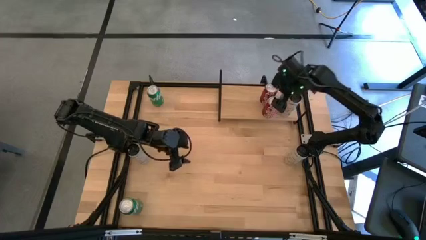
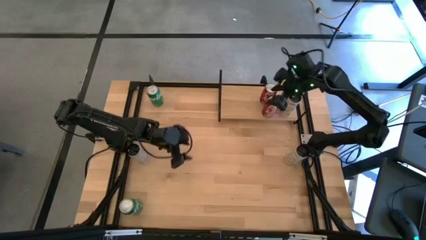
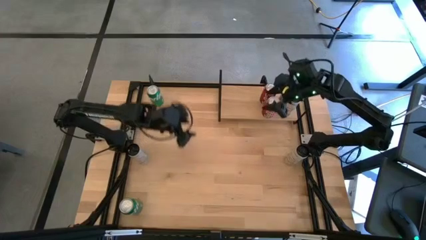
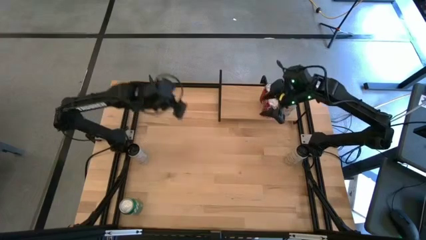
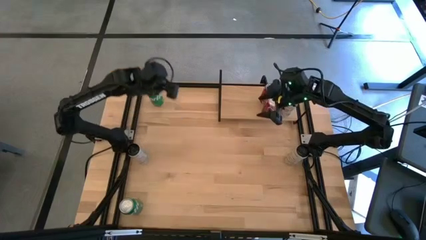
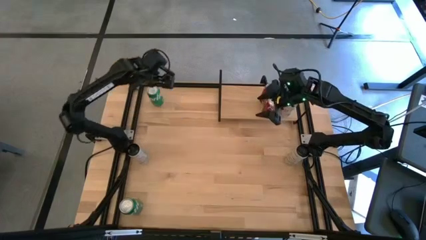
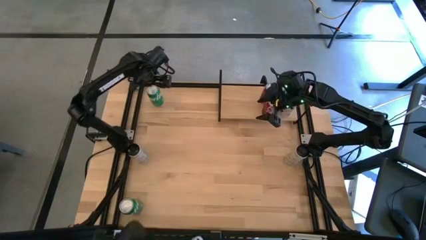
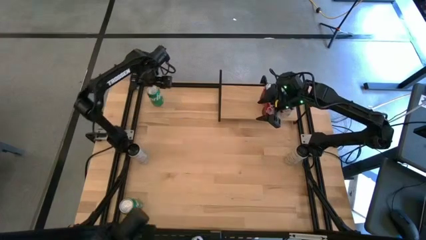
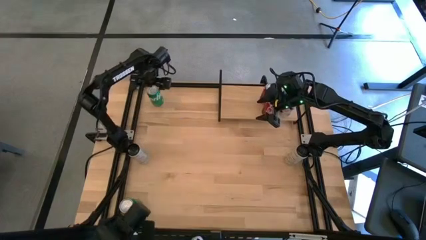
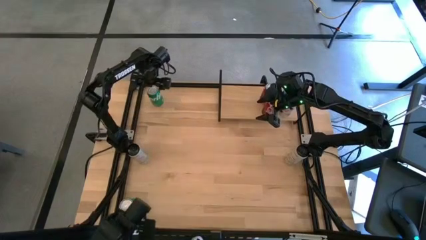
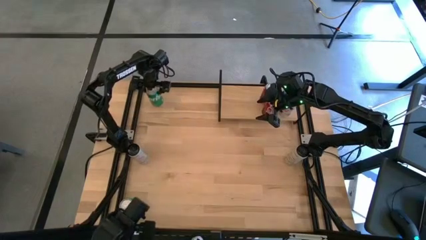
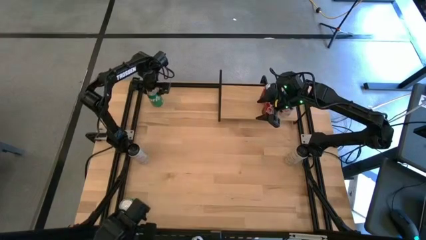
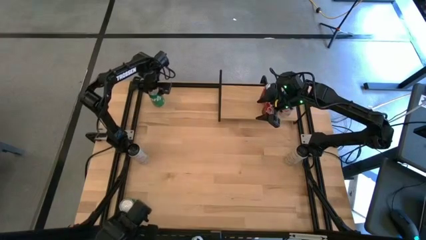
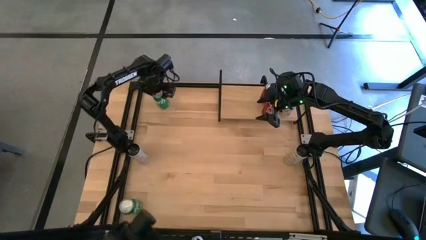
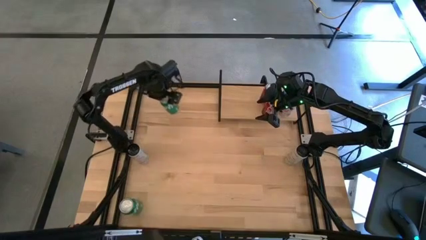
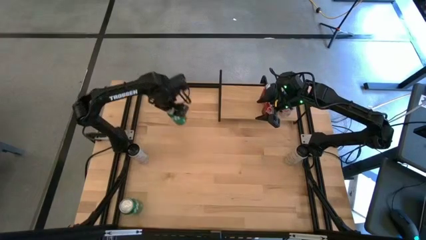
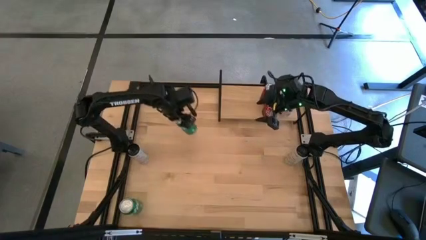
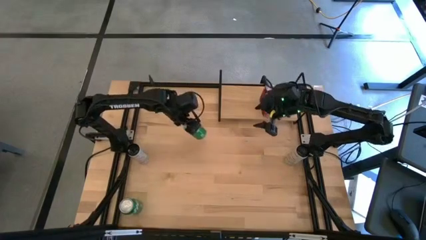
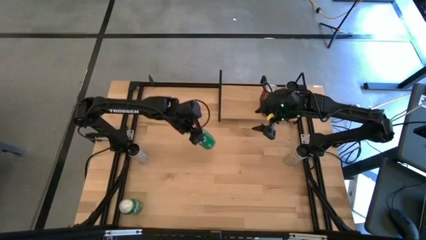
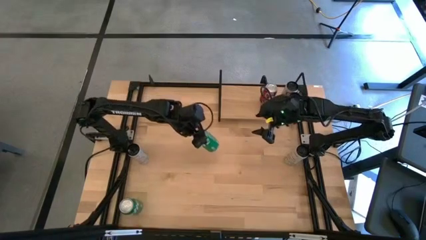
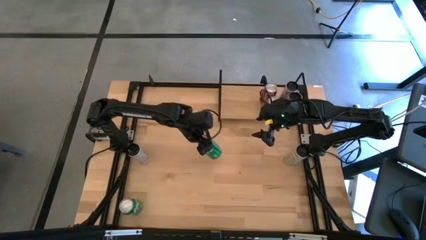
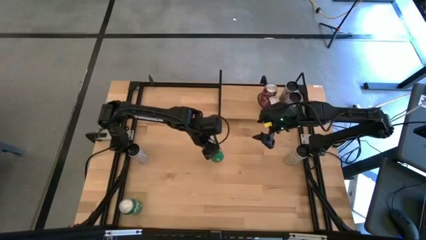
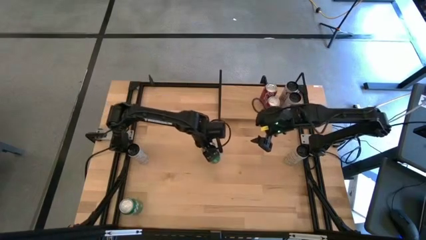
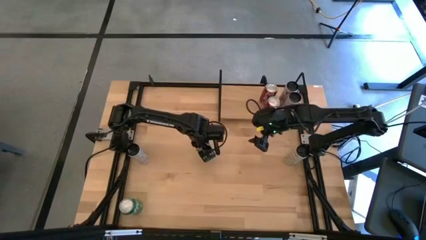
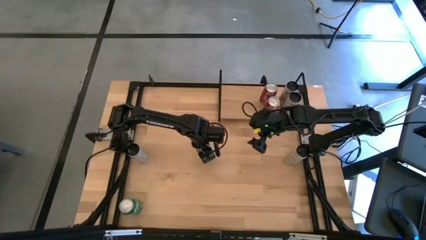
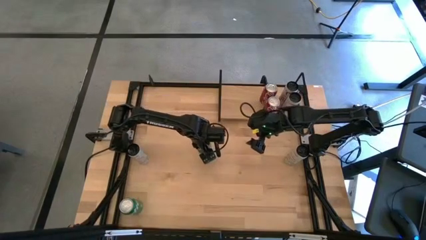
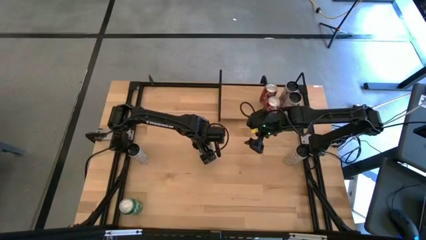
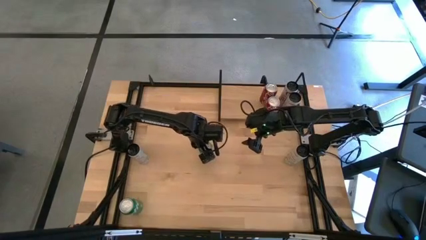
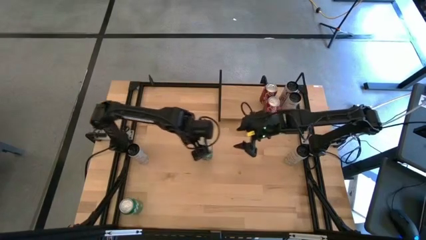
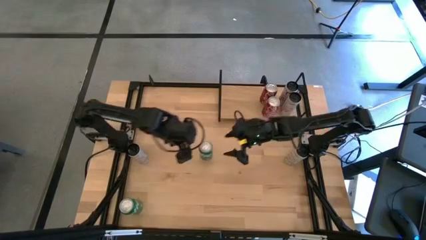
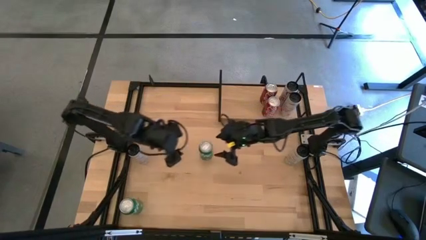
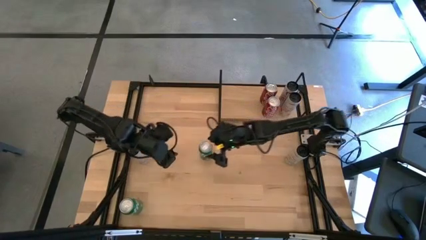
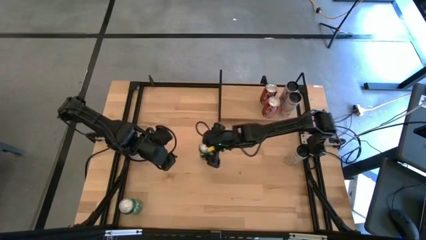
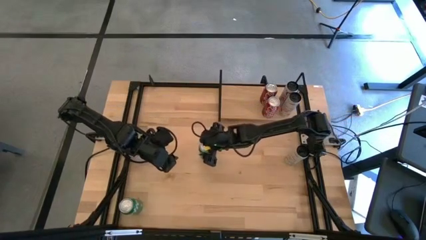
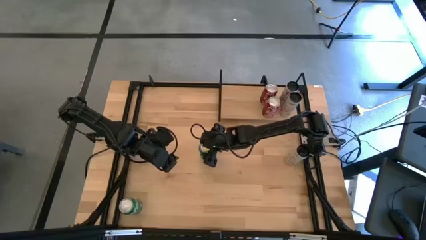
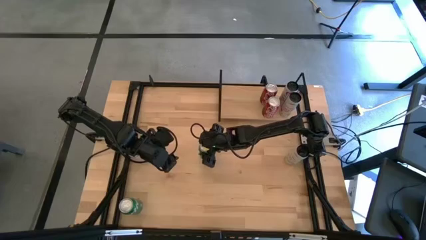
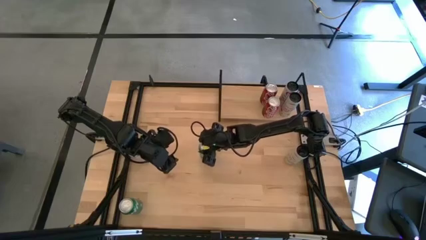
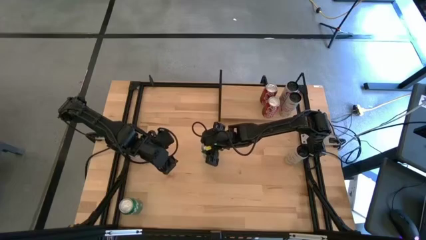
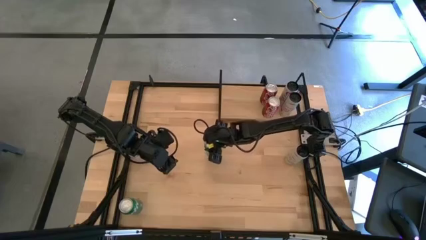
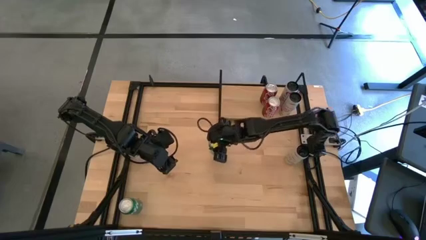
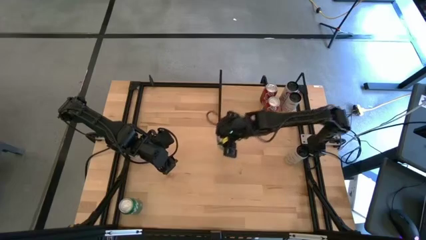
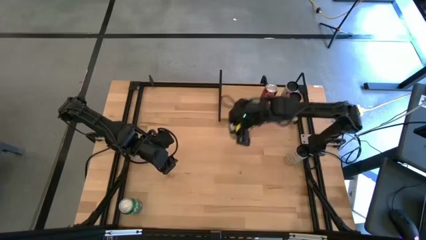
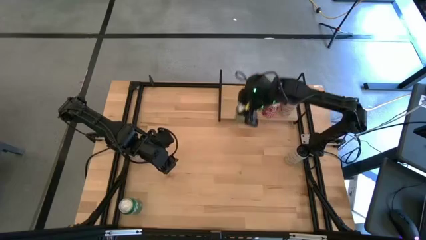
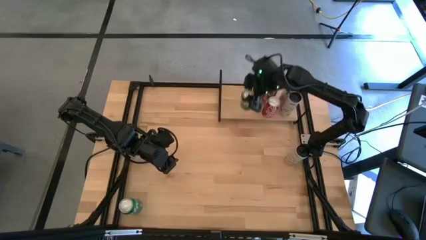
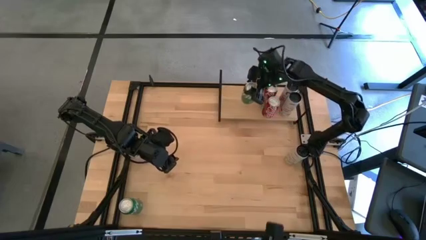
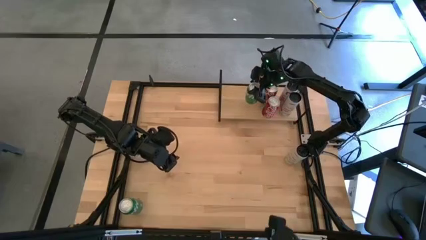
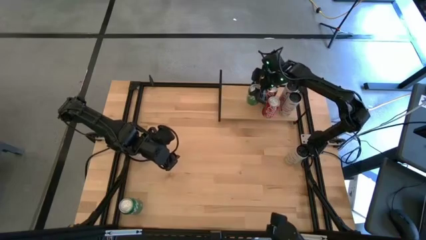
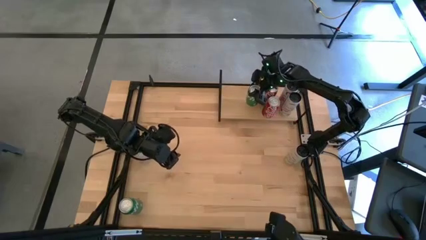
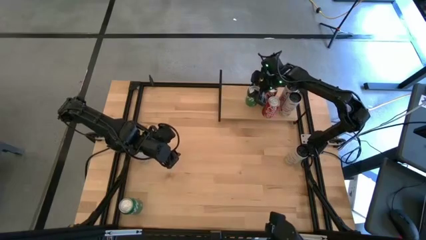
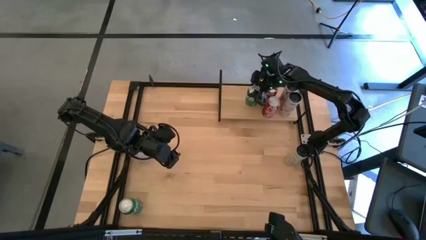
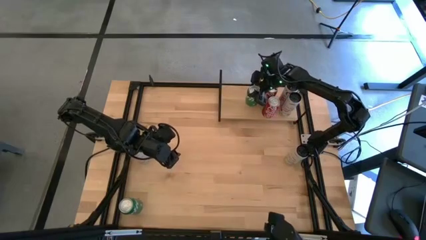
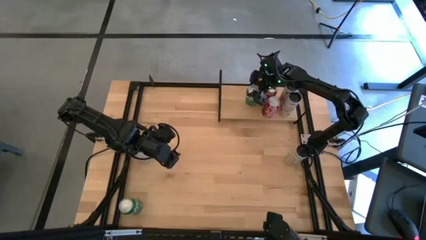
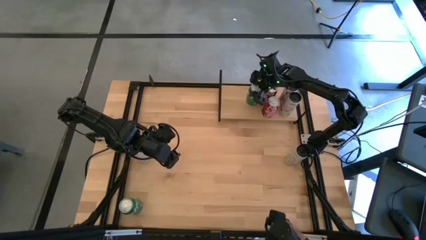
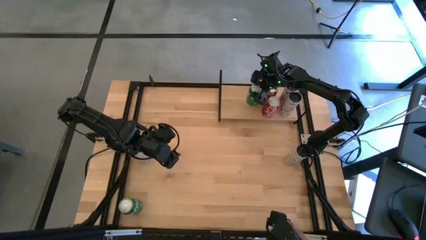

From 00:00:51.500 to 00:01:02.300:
Task: Place canned beverage on shelf
Put the top green soda can on the shelf

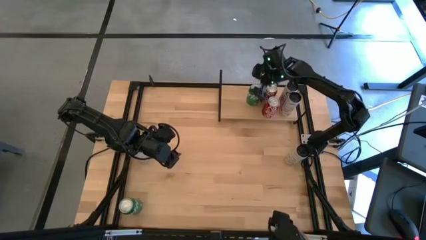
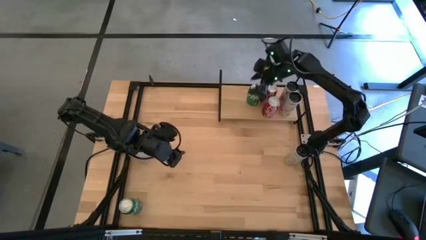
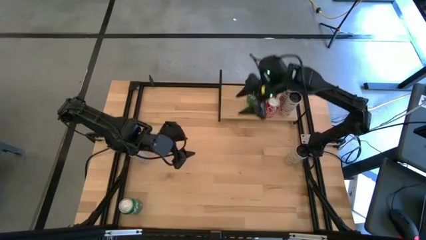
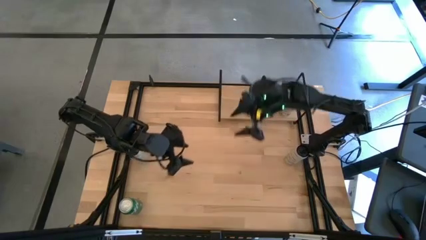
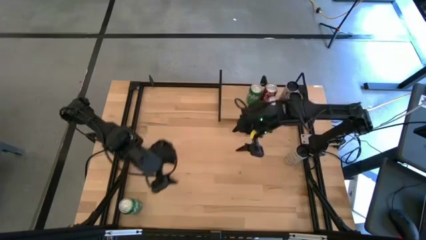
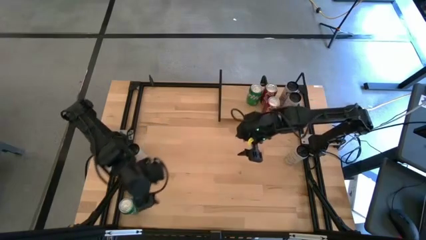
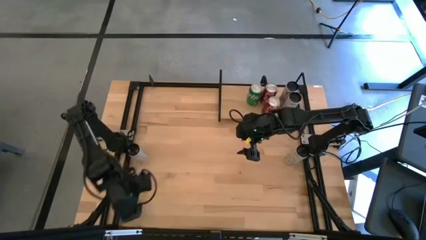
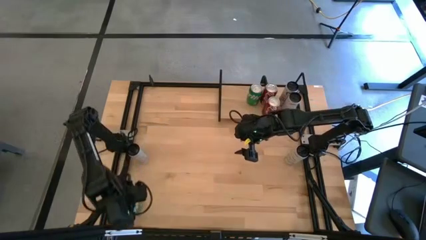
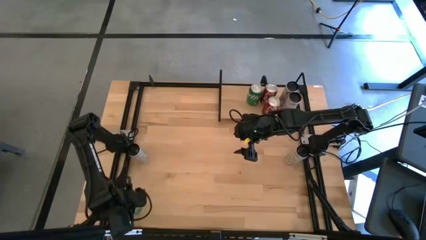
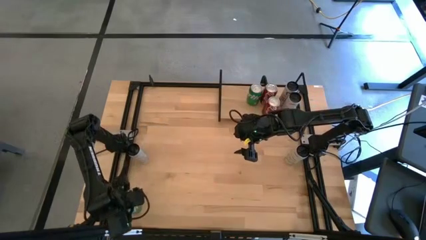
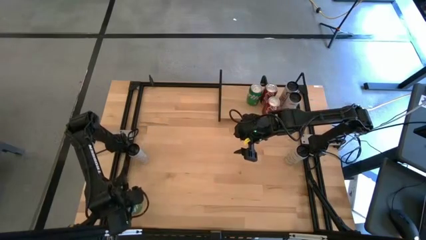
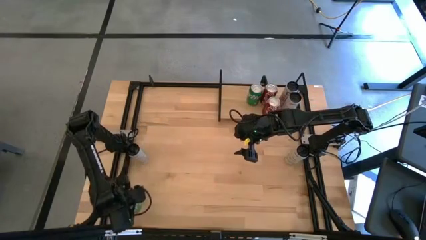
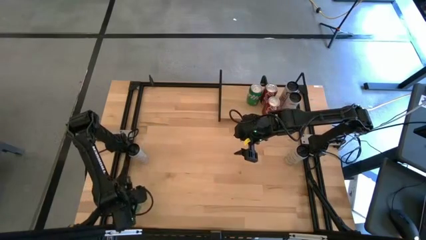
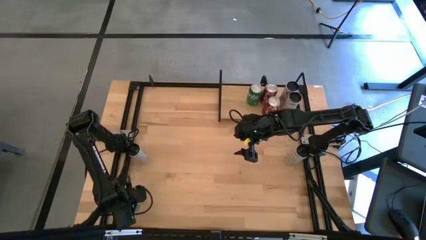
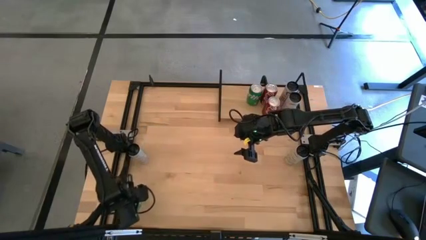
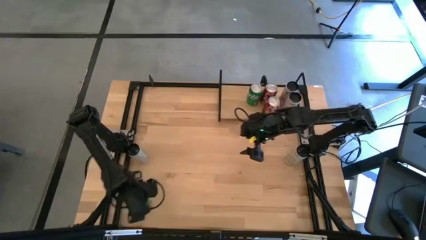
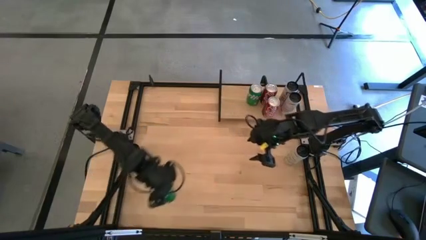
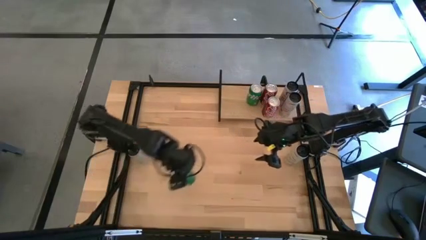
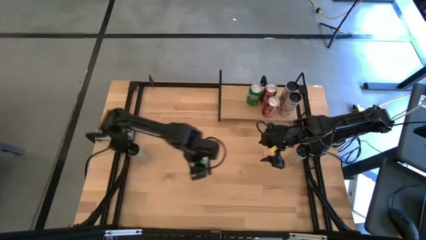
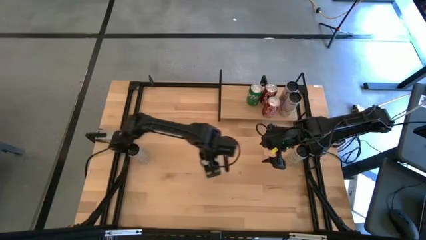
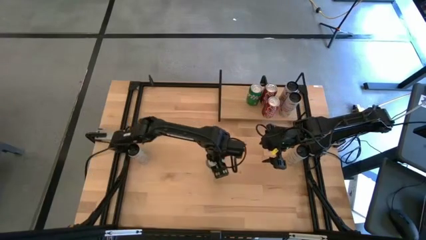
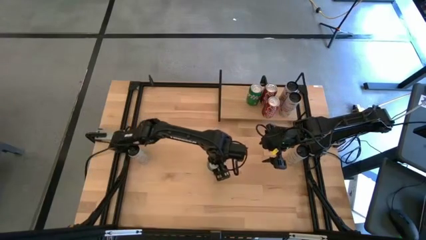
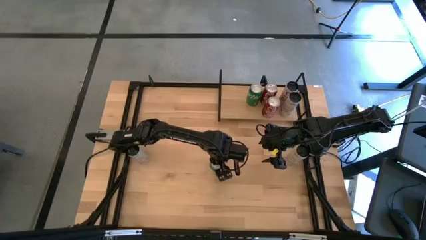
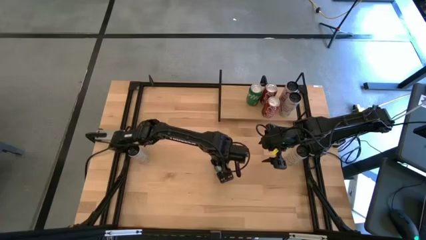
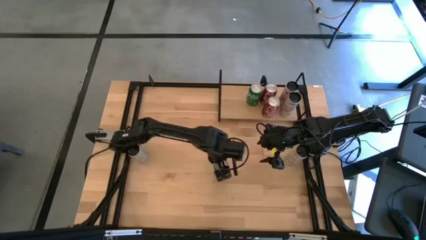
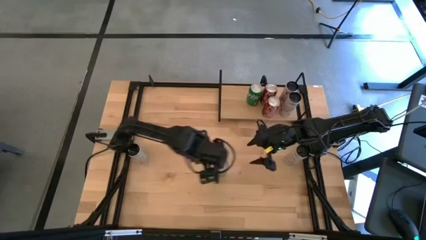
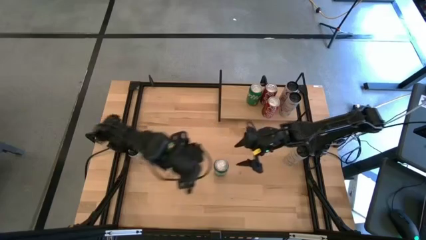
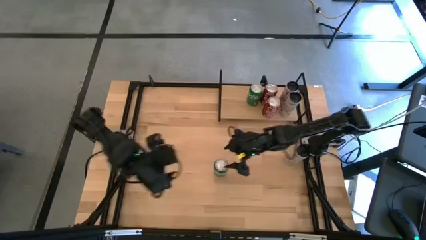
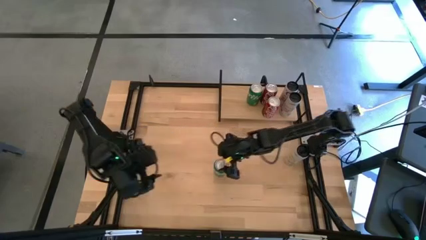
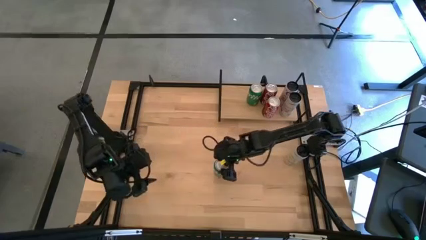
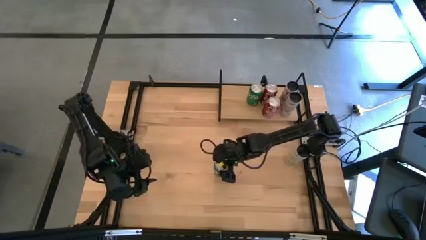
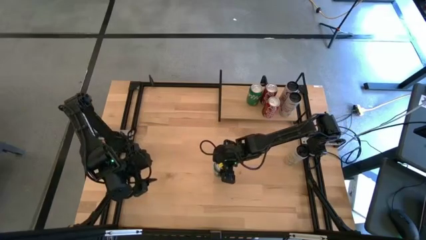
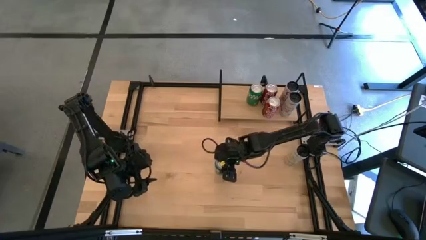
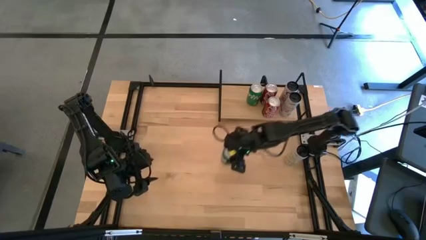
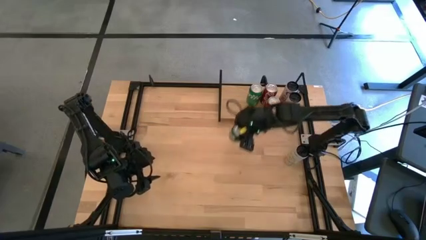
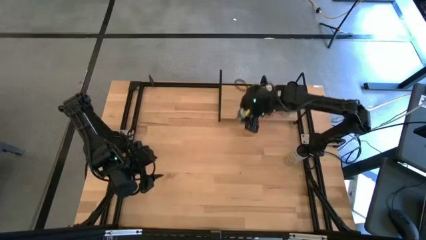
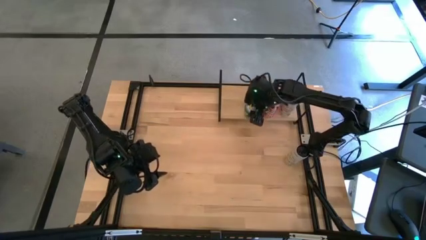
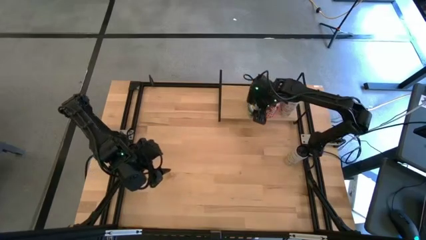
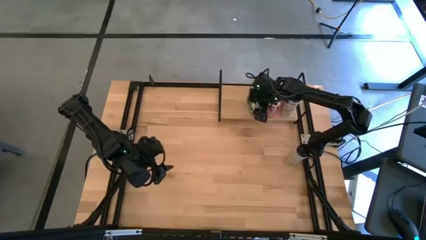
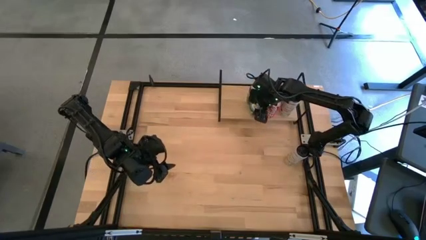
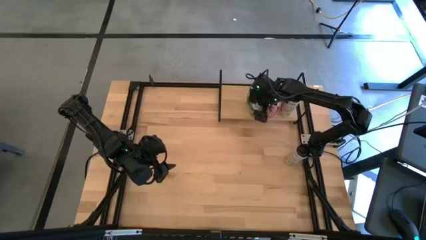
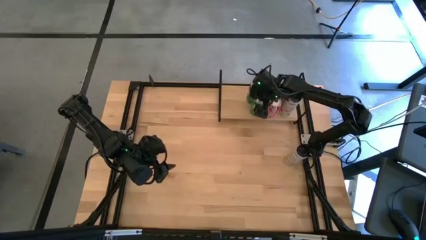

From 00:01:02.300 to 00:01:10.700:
Put the top green soda can on the shelf aligned with the other green soda can
